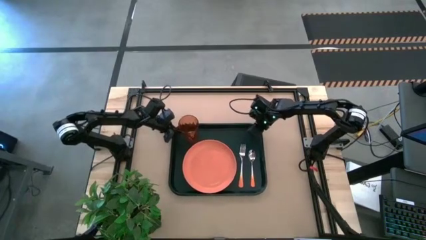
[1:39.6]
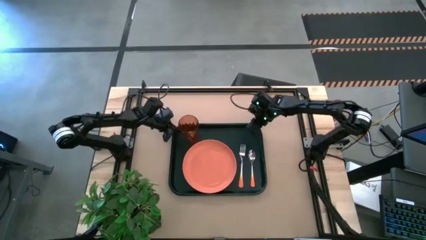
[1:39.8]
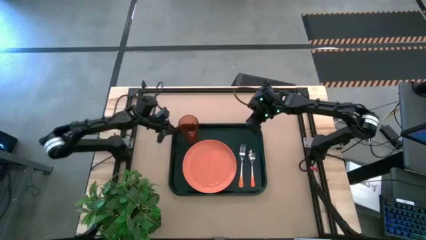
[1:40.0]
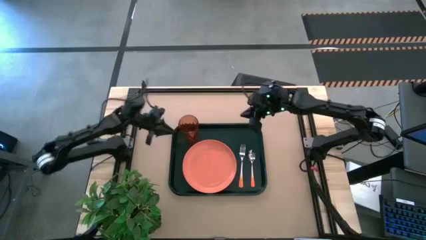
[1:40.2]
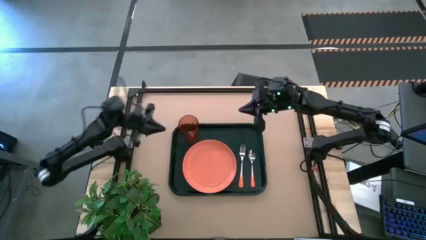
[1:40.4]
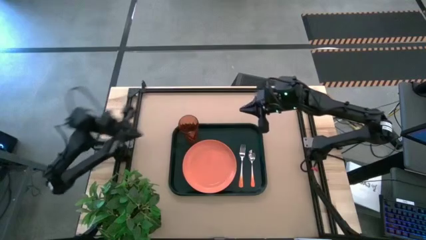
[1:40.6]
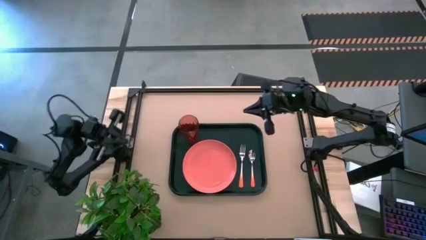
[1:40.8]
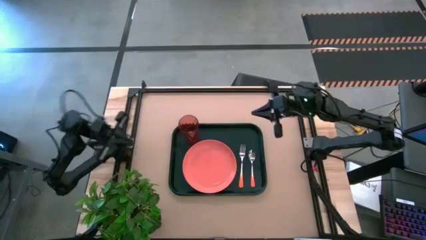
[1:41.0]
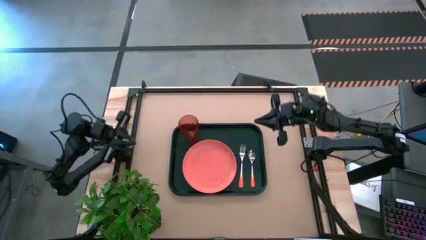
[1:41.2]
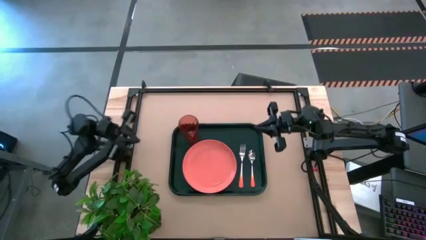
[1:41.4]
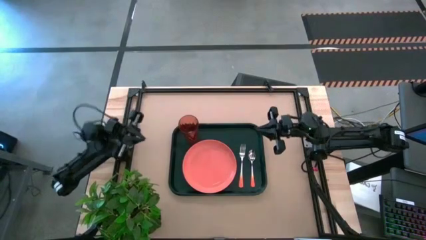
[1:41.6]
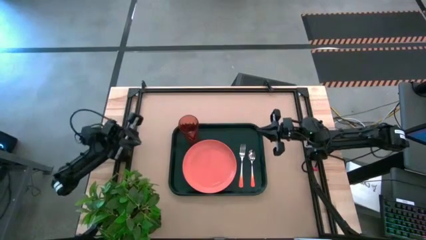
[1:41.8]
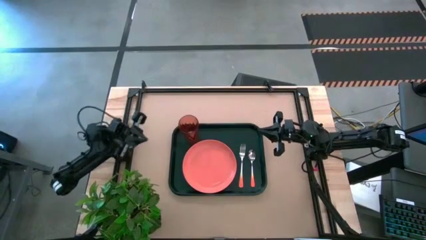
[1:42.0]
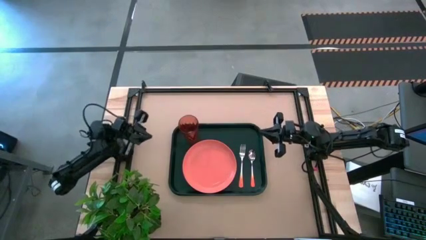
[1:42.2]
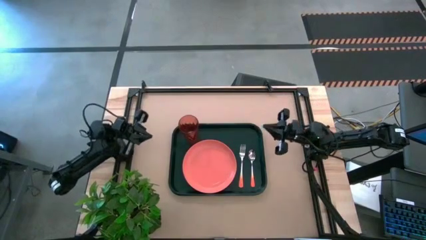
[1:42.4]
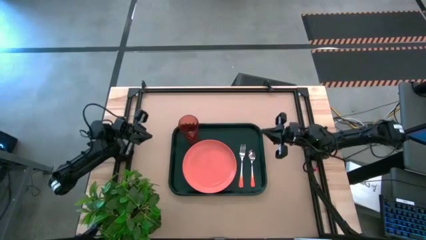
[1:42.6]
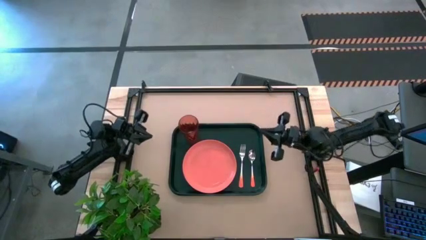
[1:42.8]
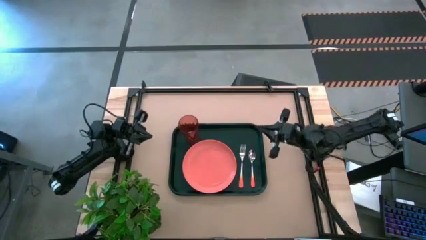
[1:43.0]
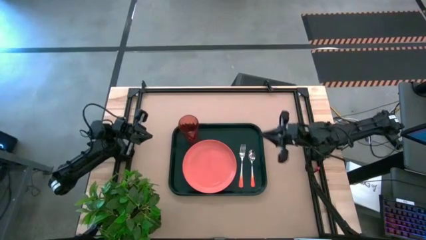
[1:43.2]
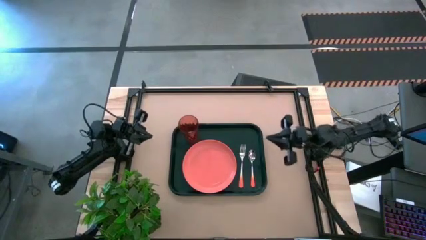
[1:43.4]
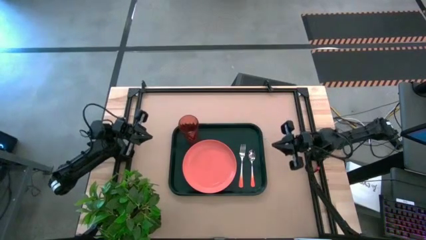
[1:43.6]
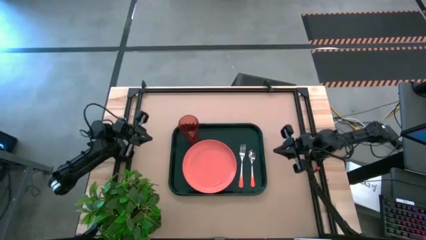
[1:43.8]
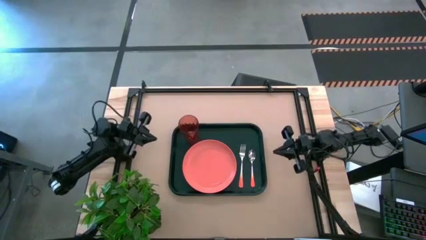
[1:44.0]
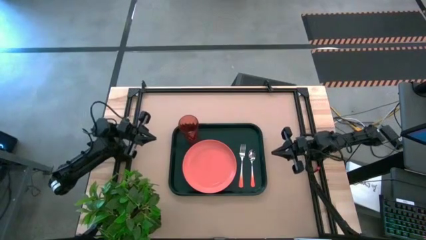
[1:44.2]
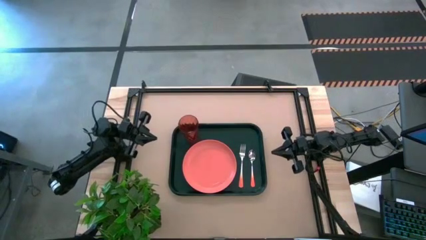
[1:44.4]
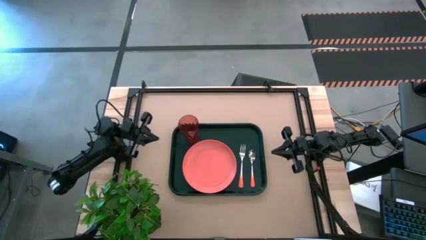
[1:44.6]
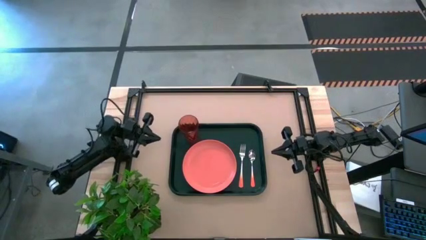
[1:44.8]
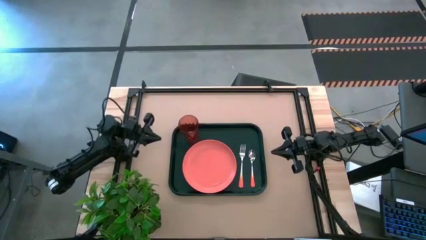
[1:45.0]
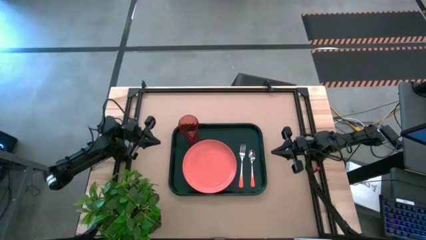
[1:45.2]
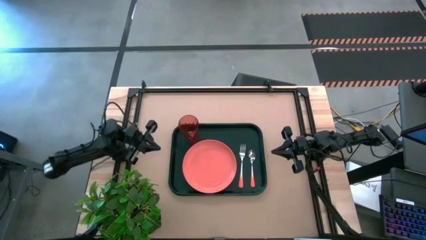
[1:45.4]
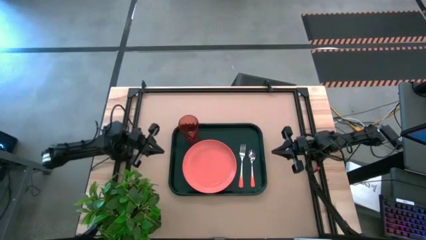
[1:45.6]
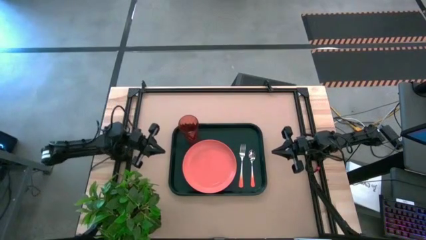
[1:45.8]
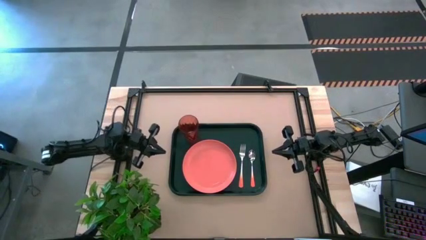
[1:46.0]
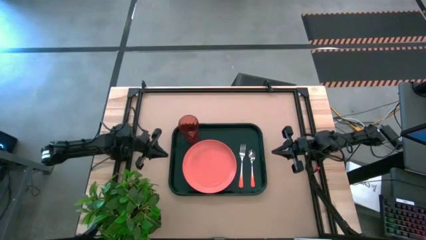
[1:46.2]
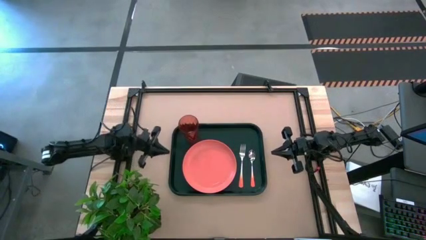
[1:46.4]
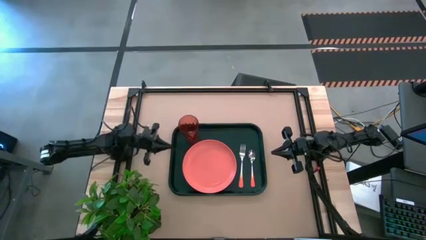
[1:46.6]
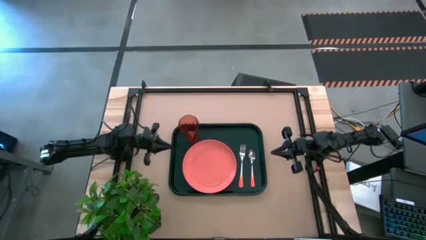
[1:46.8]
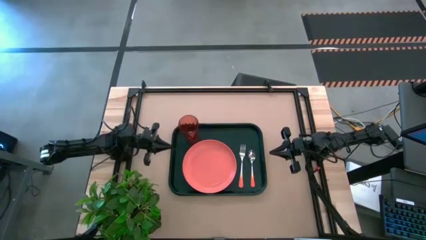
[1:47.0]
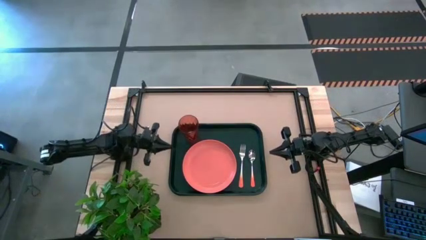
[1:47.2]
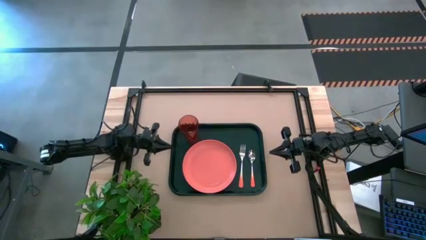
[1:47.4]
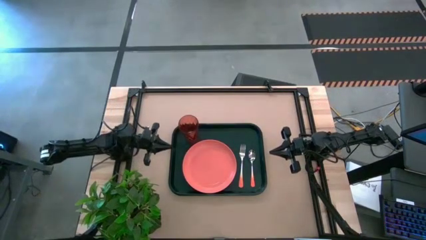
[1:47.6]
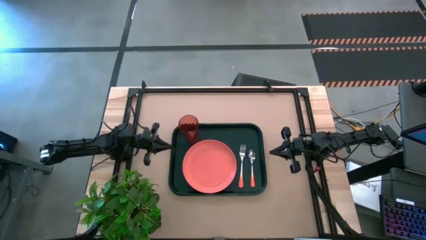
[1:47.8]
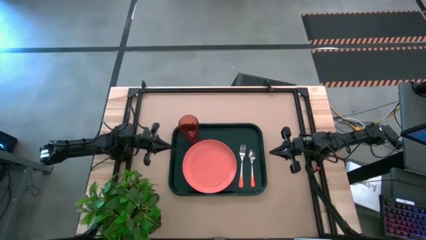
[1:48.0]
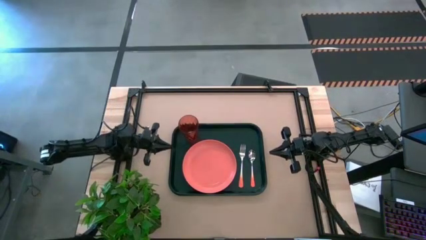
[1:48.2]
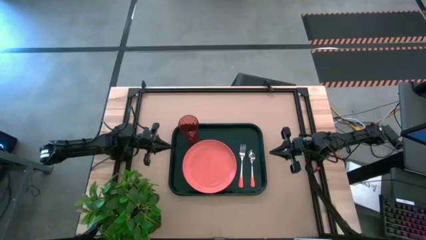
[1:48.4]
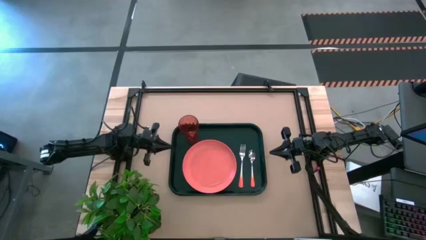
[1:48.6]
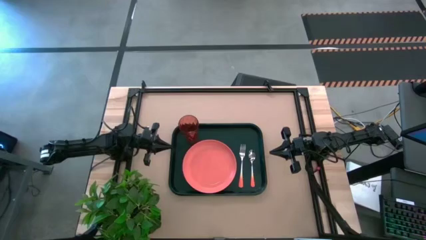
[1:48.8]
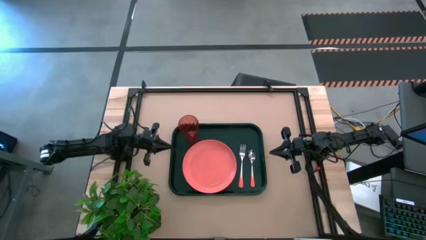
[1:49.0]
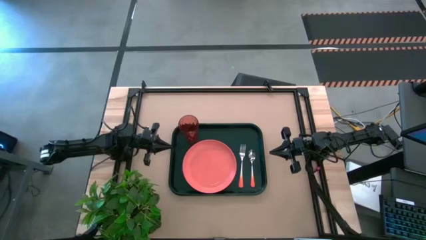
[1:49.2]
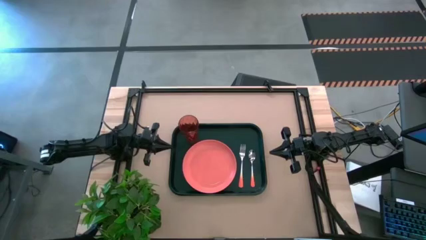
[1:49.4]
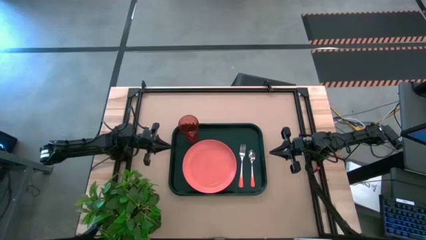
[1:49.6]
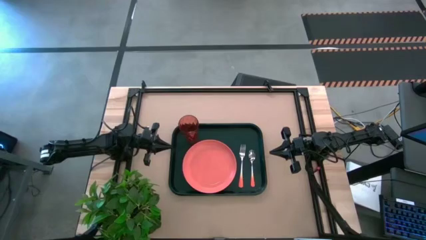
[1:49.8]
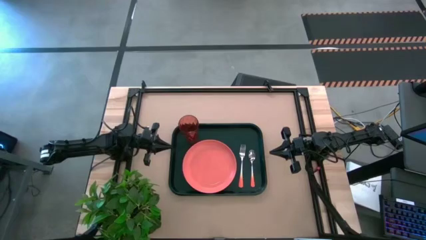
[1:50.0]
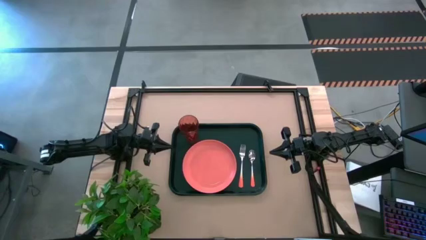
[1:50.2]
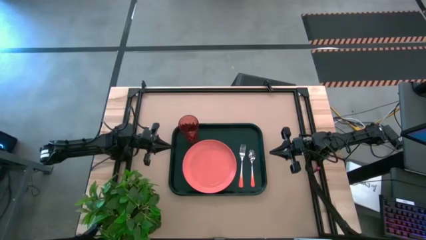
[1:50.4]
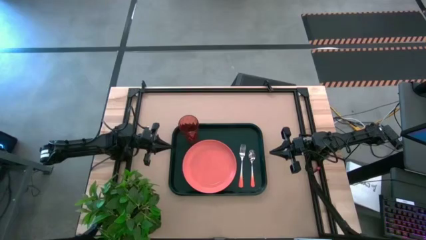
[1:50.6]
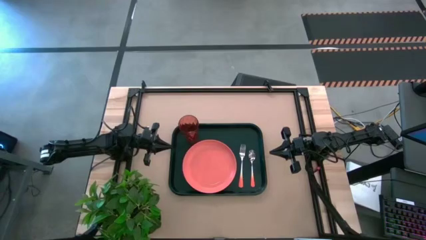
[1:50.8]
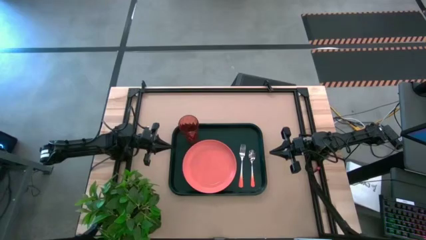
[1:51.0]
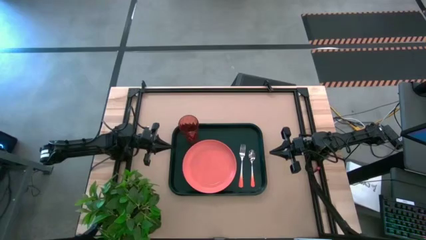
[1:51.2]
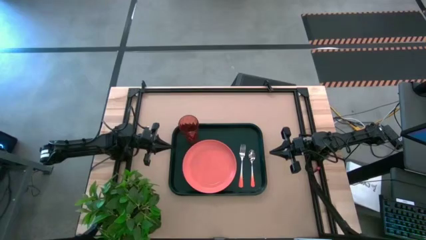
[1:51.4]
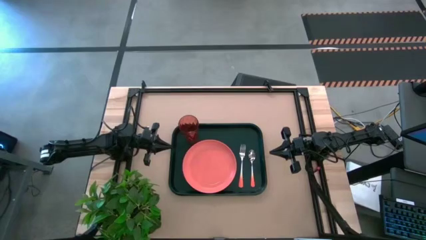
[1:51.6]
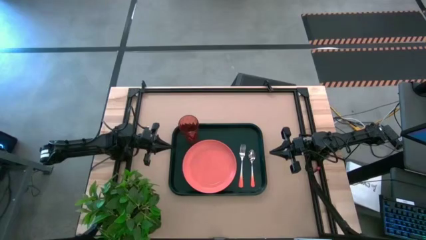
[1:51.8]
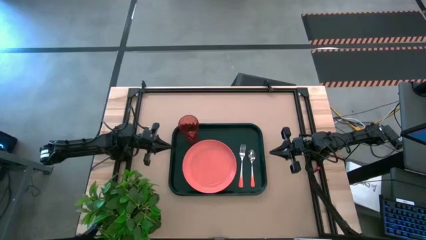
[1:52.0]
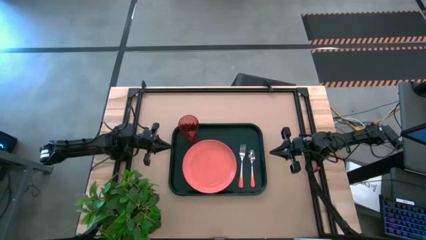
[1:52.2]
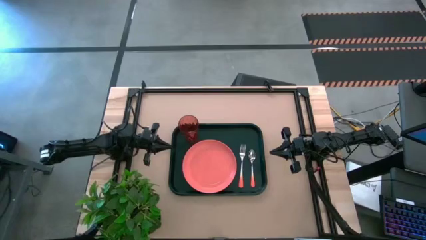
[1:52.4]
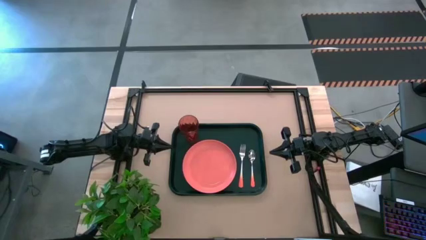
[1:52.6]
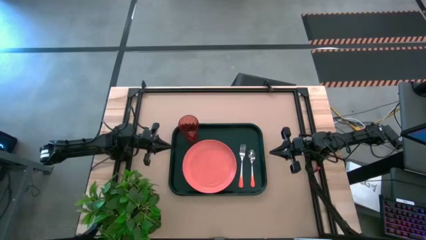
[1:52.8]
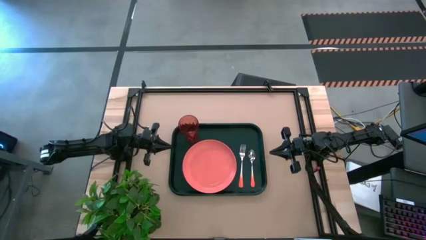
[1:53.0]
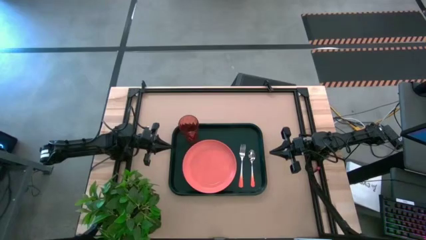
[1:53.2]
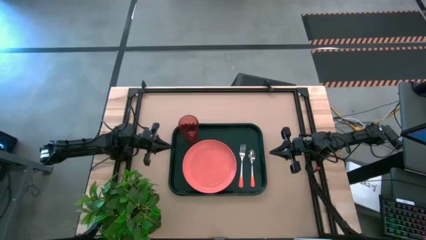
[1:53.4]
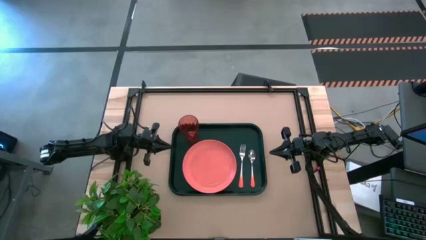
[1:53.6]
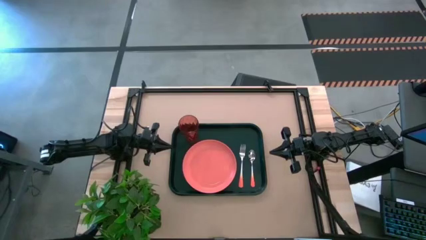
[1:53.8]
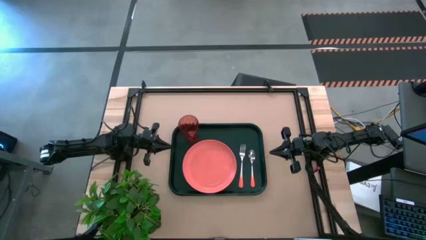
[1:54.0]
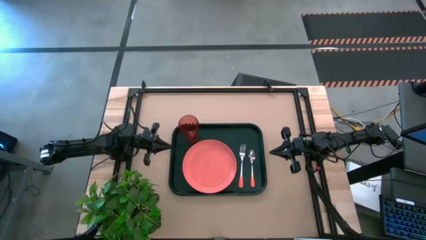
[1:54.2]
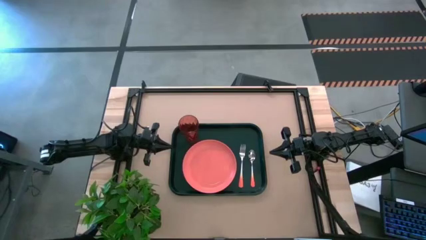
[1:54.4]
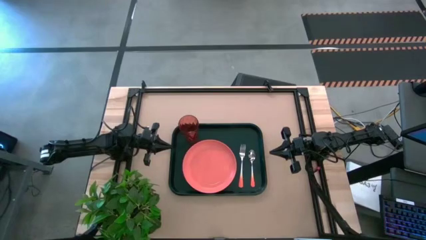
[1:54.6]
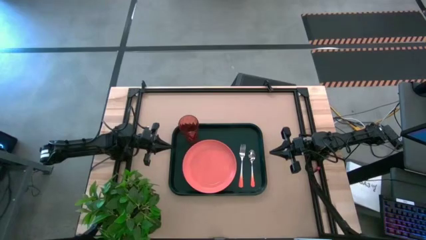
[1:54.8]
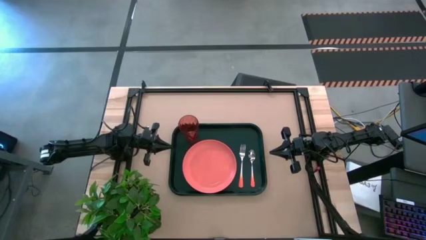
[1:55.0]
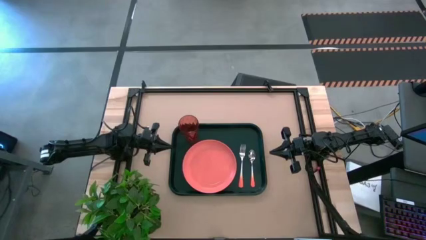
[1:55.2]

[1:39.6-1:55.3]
Task: Pick and place plate/cup/fork/spoon on tray
Return to Home Position
